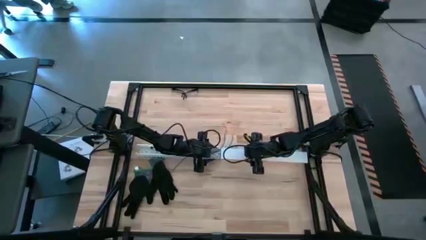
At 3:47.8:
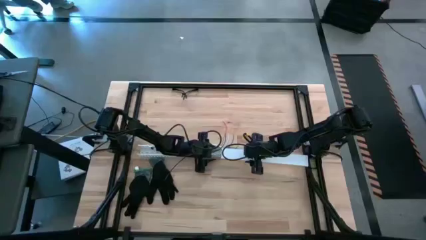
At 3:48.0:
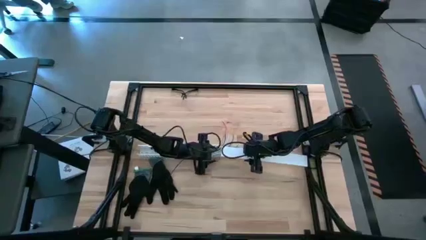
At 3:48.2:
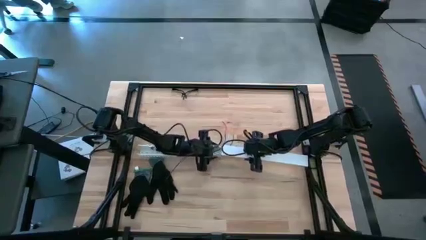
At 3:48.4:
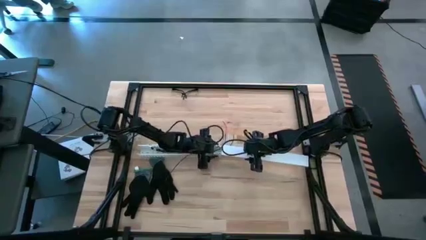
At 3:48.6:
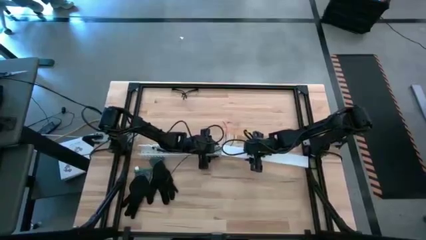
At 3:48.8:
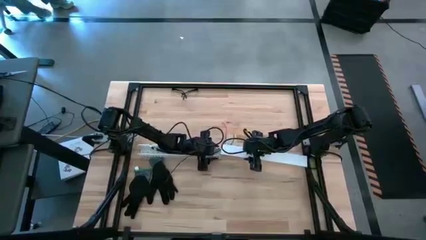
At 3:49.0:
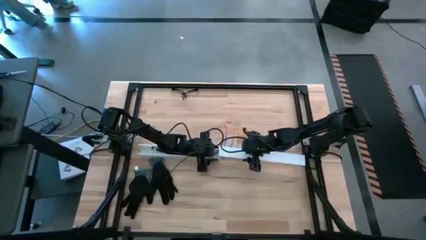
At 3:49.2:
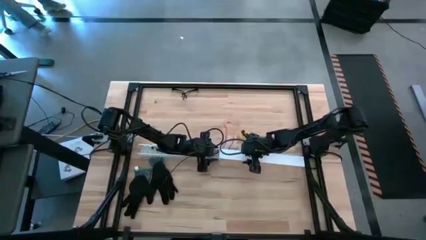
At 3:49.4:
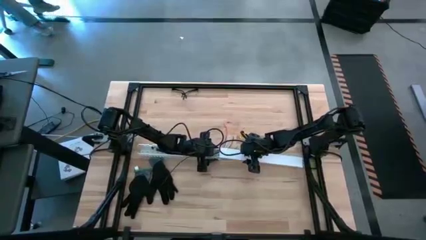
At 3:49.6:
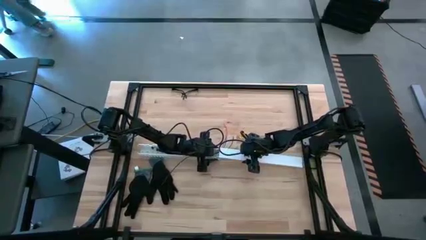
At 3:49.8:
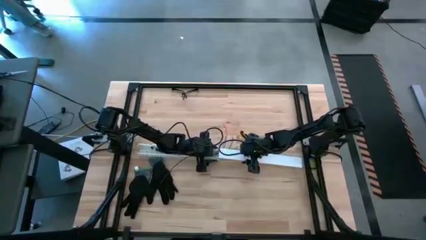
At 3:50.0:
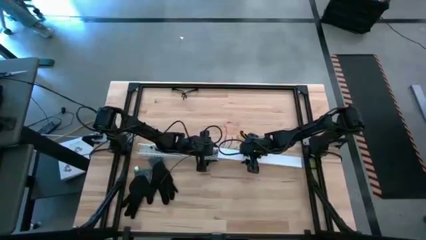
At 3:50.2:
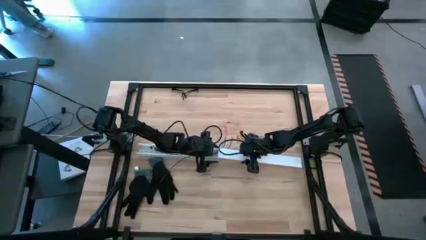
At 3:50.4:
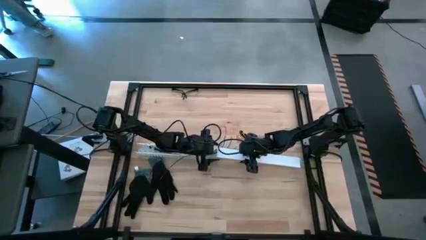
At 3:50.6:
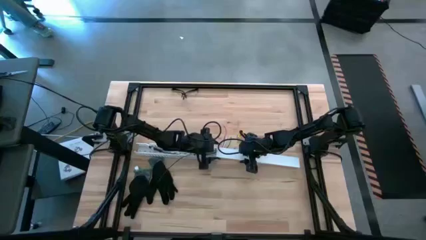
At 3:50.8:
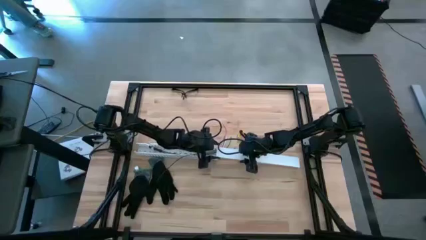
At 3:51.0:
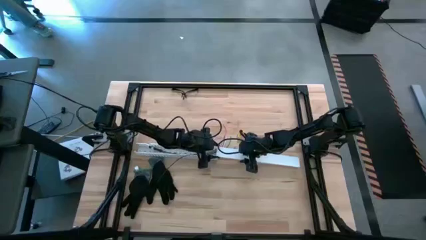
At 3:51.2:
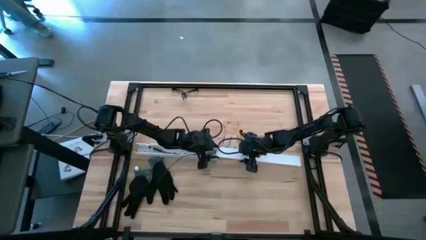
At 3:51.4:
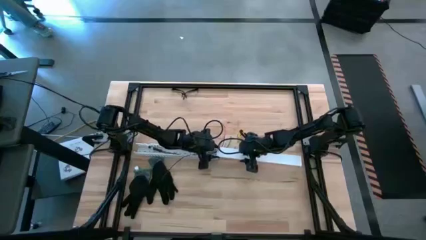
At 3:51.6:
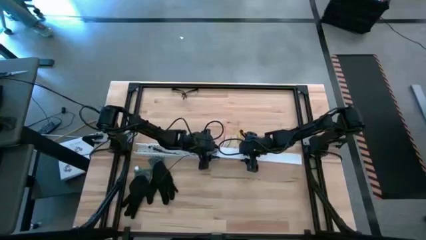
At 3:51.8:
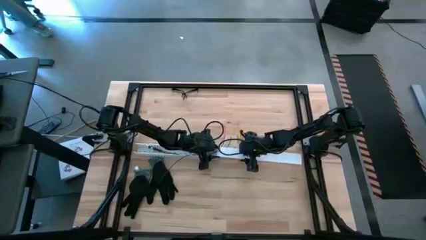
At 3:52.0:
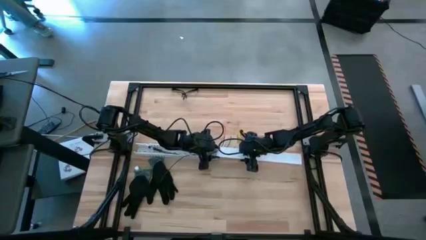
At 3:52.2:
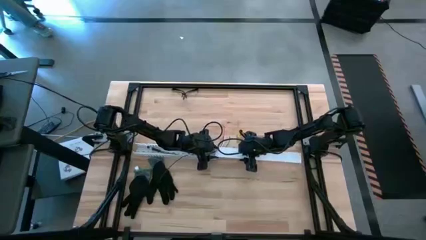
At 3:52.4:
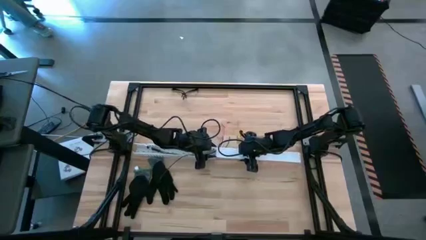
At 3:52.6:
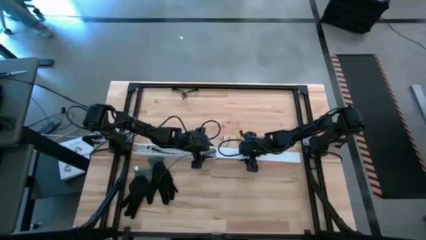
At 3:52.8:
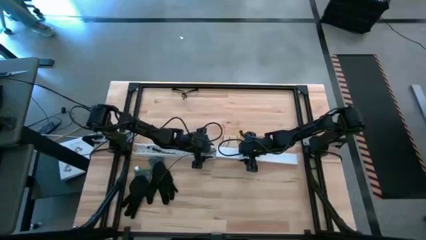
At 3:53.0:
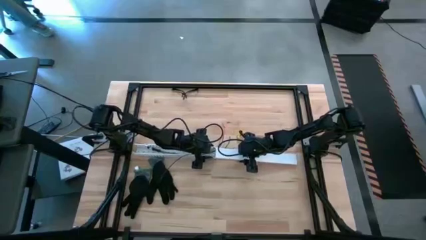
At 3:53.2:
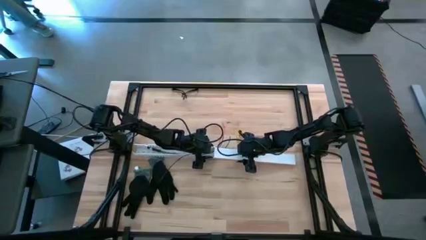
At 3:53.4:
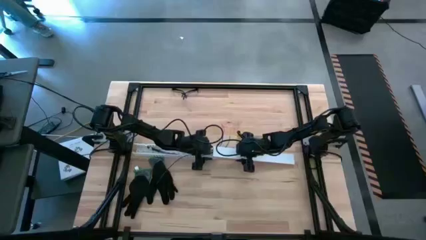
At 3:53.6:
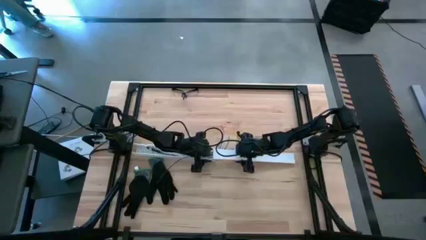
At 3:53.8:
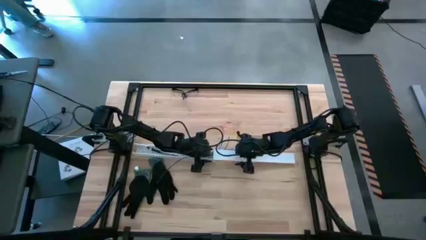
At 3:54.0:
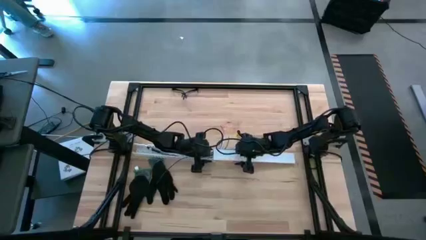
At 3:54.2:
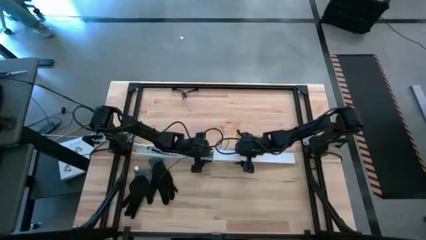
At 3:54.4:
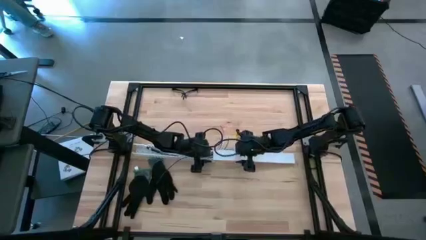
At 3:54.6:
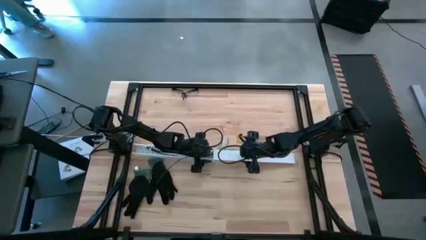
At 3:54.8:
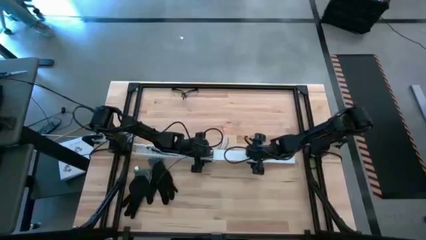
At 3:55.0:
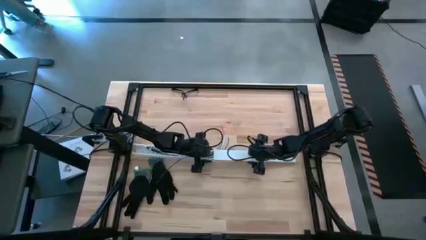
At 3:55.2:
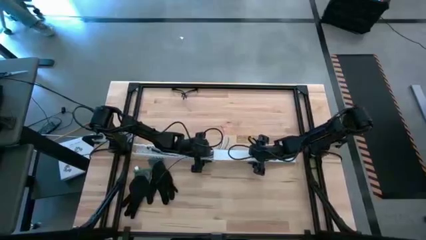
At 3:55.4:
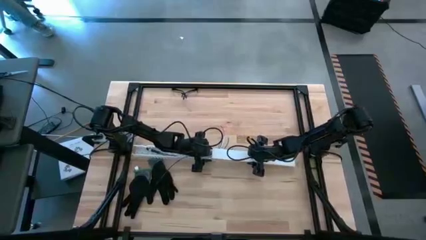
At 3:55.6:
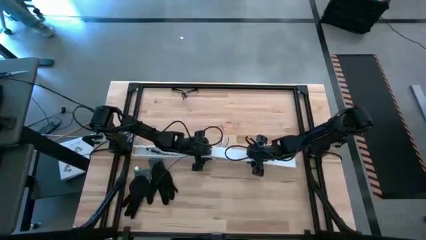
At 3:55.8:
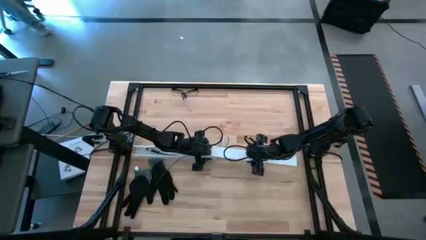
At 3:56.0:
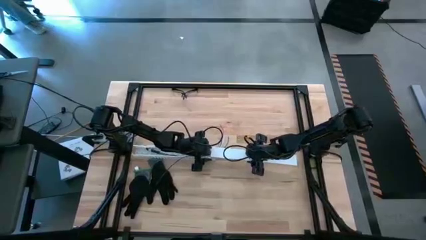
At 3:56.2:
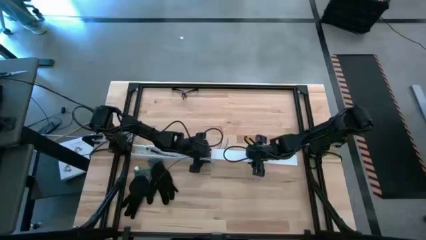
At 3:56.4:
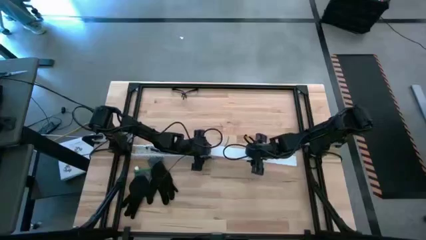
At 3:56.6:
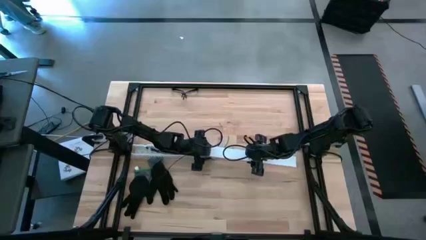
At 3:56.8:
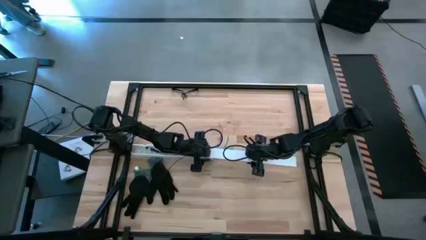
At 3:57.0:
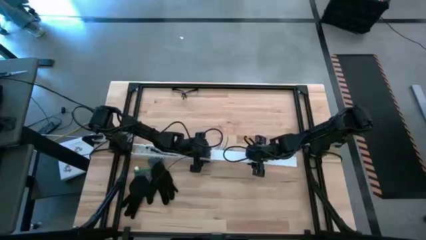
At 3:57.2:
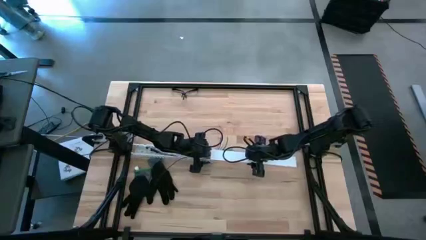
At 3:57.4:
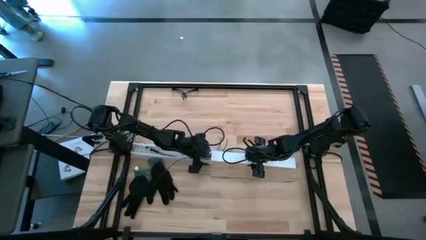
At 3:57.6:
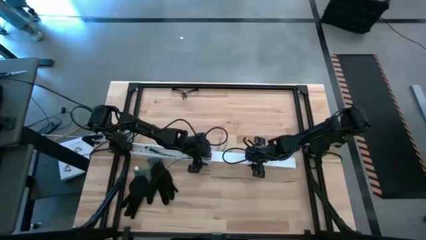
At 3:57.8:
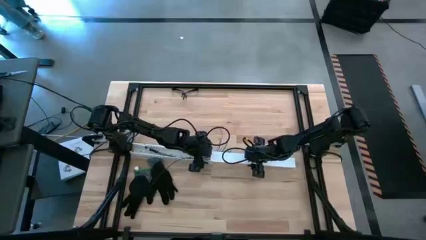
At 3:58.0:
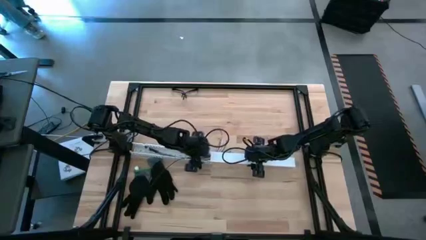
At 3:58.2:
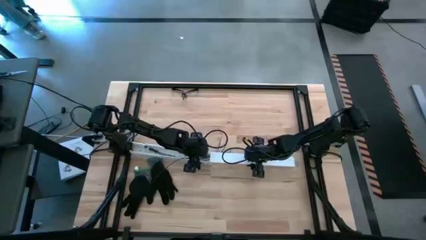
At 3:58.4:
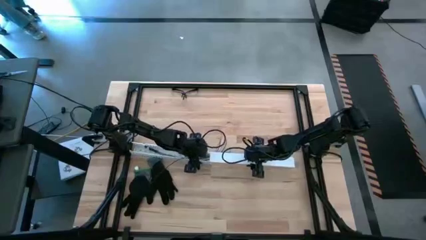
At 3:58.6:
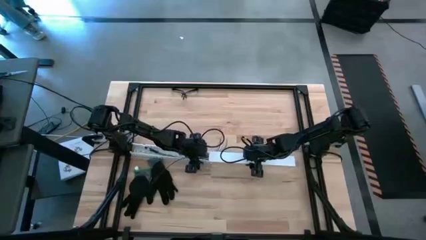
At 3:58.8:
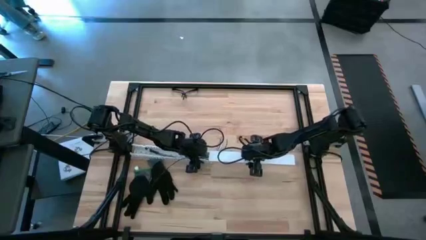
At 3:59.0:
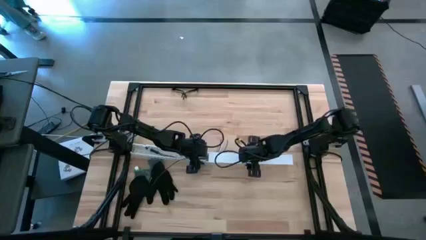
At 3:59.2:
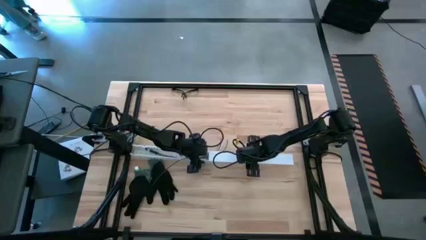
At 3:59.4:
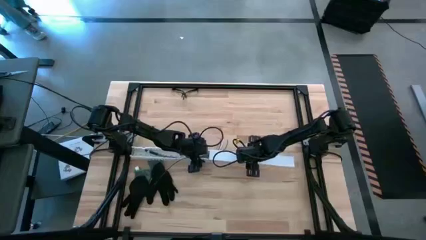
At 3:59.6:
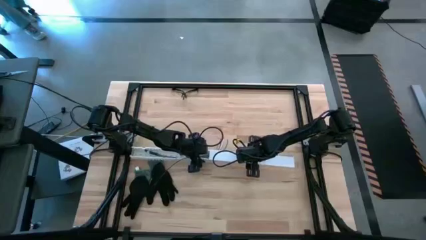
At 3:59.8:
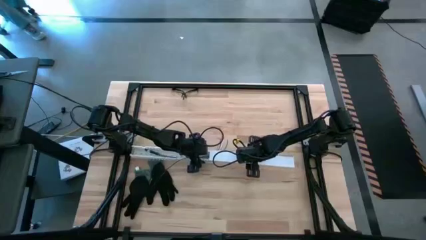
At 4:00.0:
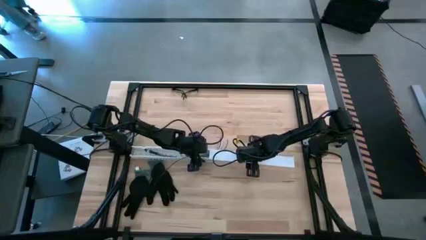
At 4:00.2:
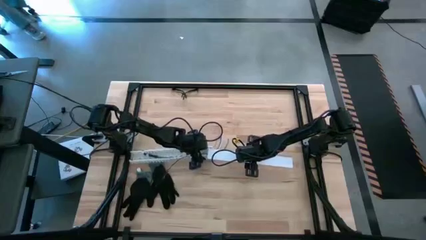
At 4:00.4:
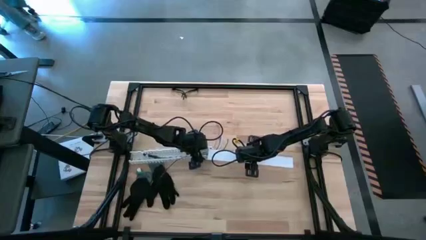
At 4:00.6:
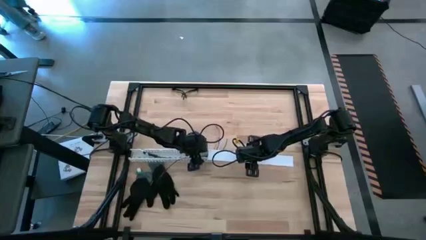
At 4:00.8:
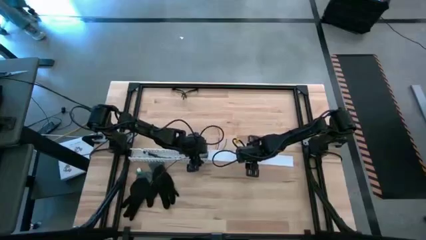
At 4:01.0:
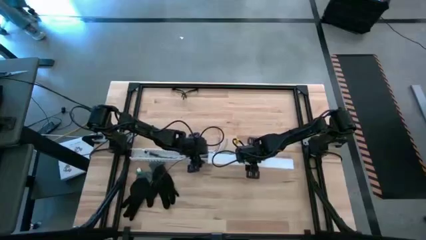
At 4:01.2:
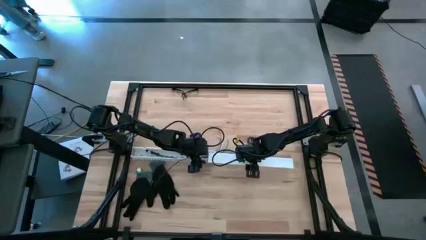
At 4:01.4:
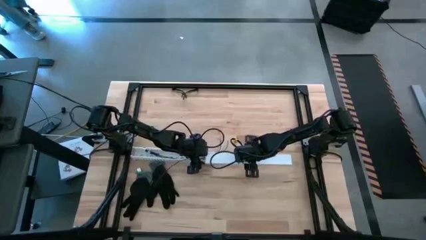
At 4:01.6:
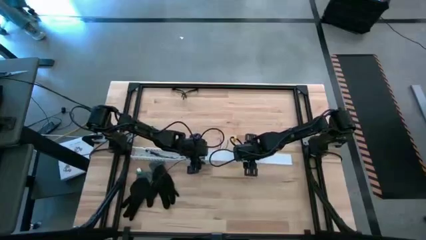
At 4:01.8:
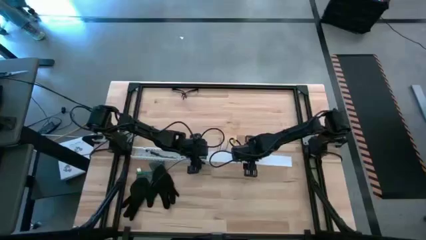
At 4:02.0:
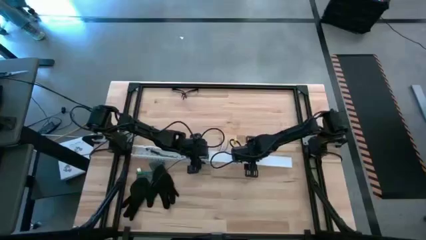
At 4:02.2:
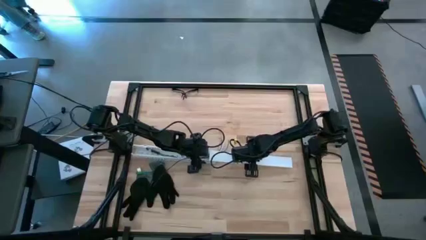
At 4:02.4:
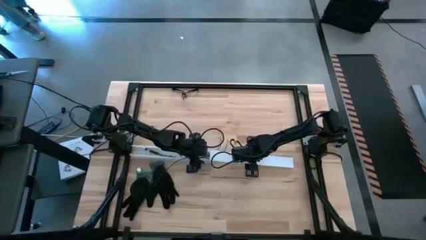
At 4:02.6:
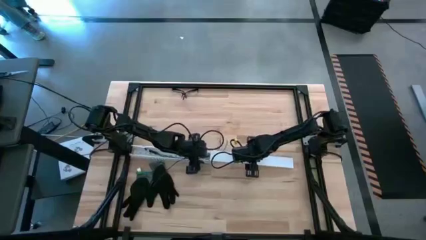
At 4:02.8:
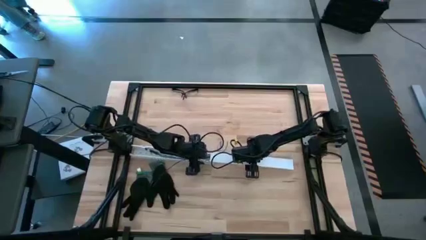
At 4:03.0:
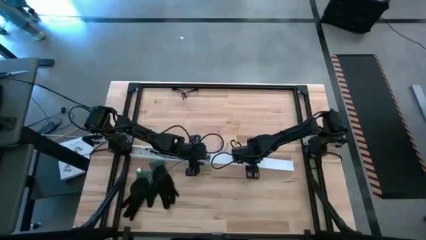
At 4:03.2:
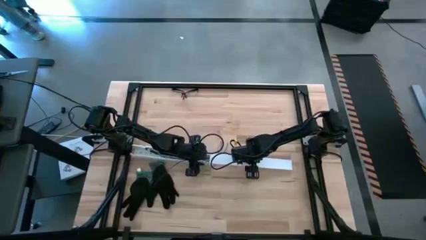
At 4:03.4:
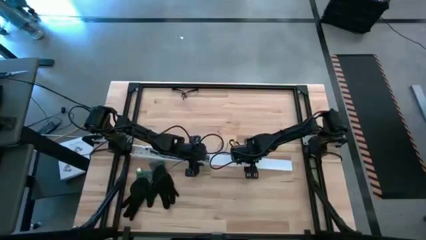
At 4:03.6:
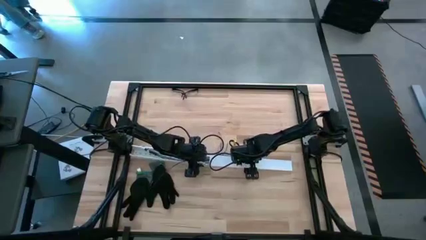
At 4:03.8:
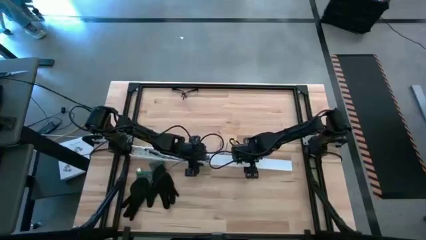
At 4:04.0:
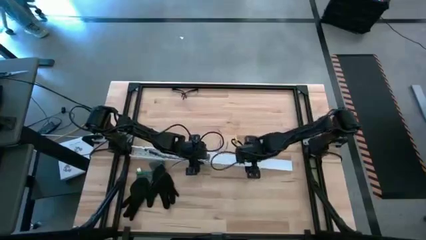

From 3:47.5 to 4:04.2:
Task: Ziptie cables
Close the white cable duct
